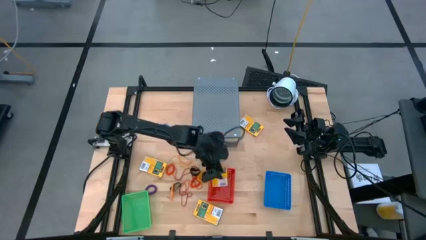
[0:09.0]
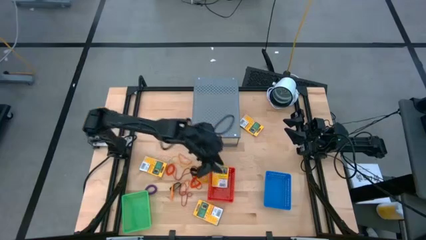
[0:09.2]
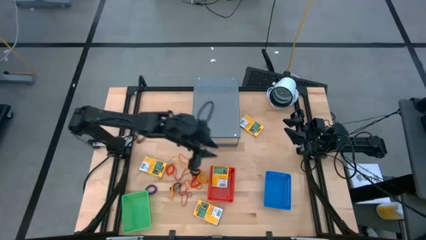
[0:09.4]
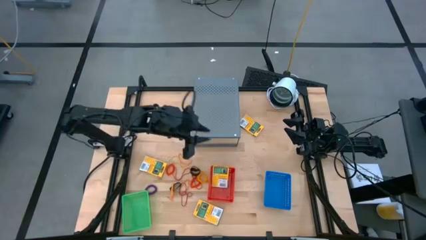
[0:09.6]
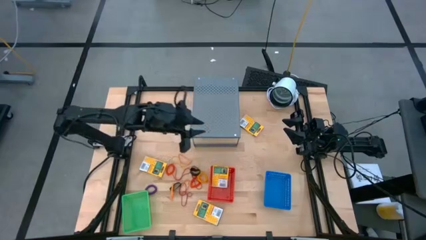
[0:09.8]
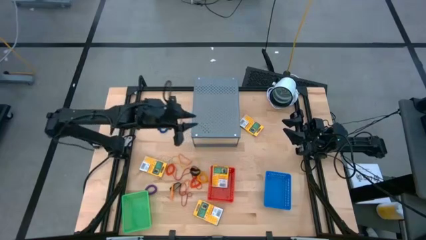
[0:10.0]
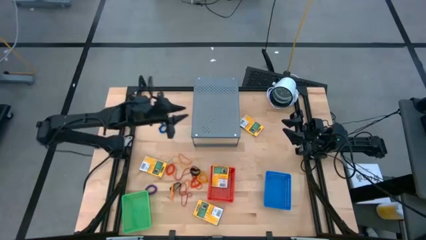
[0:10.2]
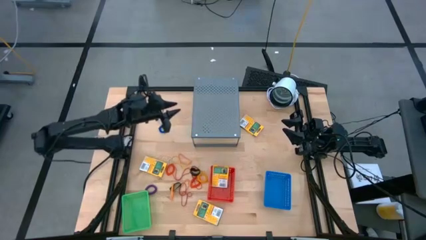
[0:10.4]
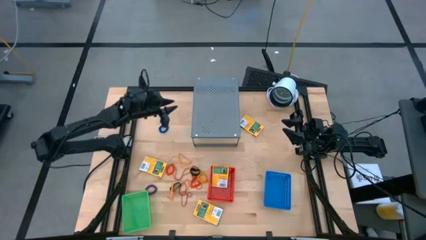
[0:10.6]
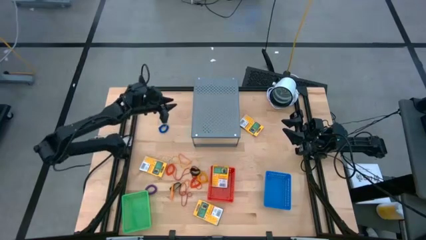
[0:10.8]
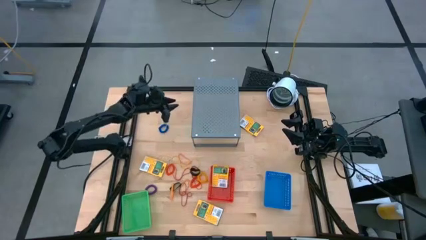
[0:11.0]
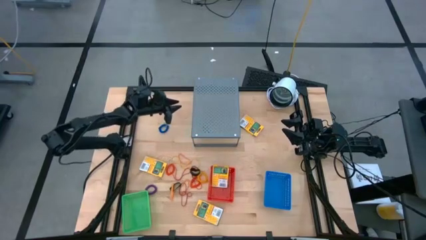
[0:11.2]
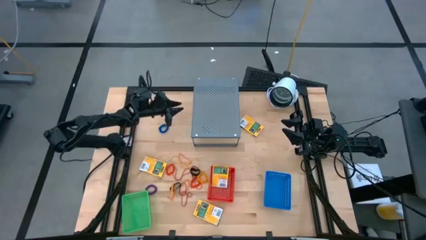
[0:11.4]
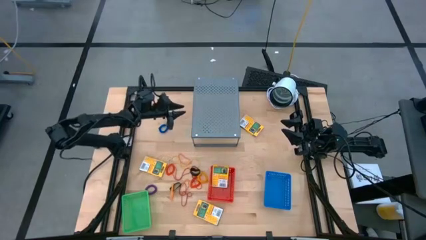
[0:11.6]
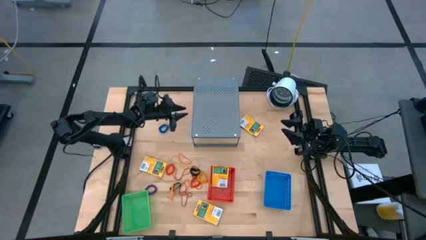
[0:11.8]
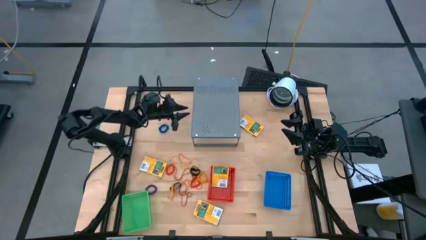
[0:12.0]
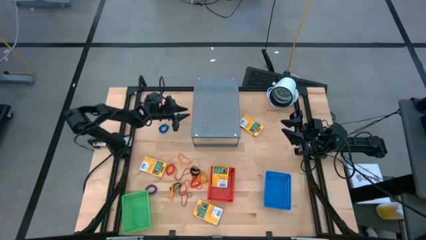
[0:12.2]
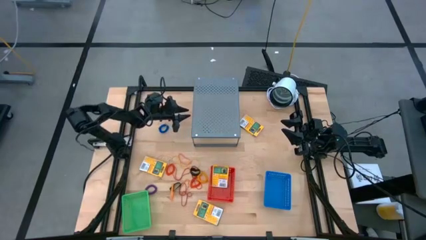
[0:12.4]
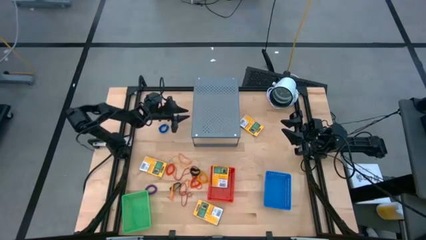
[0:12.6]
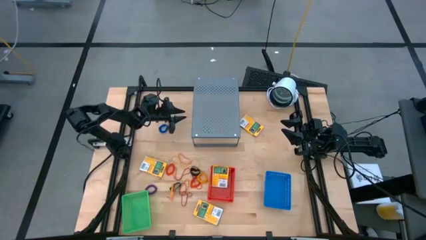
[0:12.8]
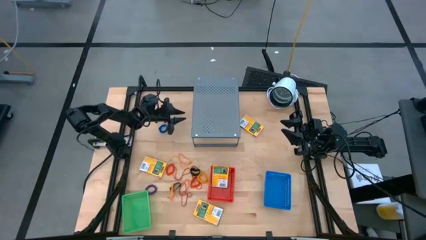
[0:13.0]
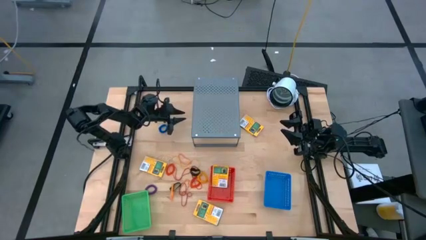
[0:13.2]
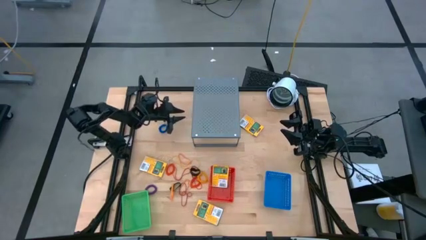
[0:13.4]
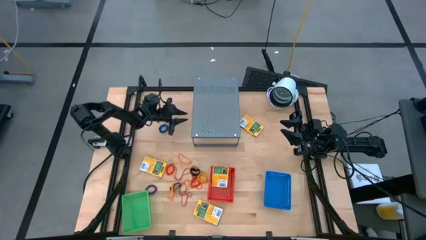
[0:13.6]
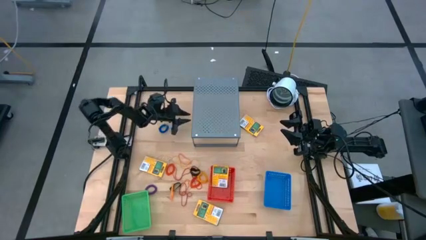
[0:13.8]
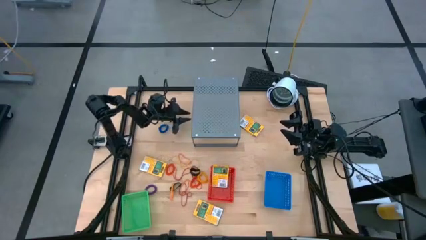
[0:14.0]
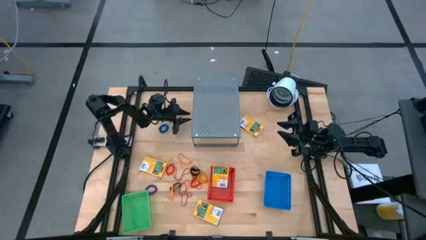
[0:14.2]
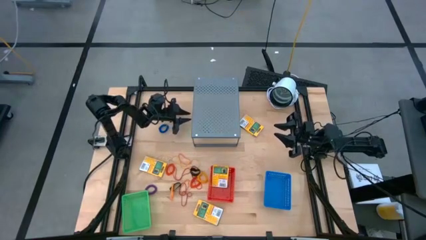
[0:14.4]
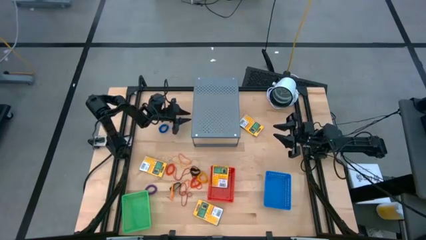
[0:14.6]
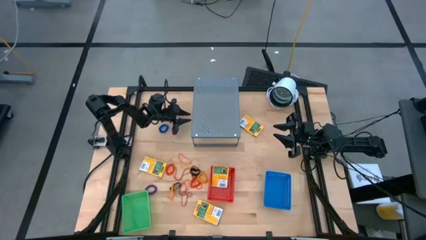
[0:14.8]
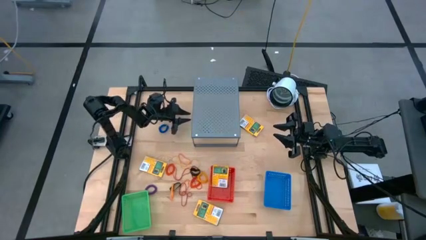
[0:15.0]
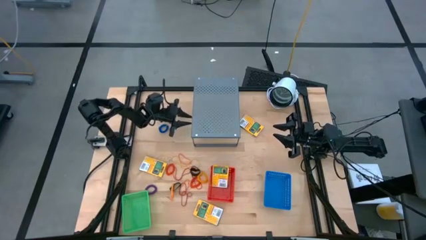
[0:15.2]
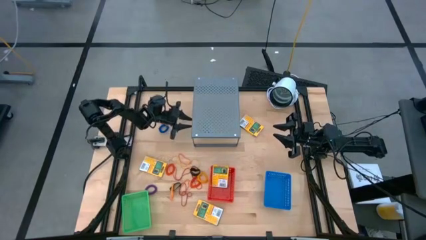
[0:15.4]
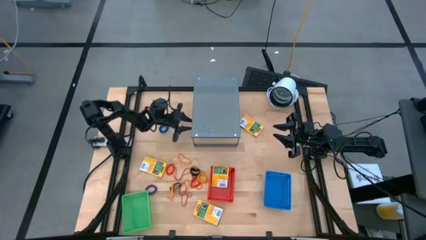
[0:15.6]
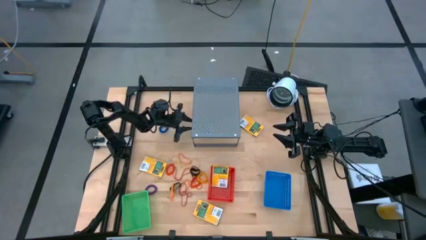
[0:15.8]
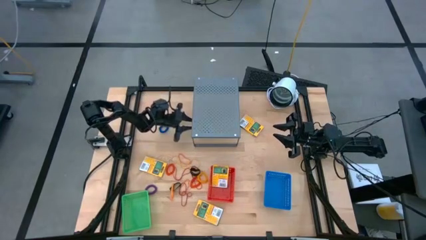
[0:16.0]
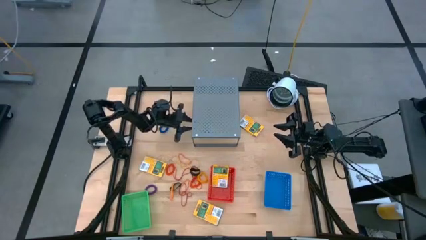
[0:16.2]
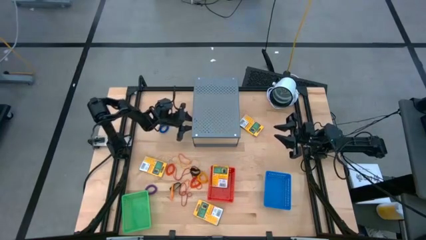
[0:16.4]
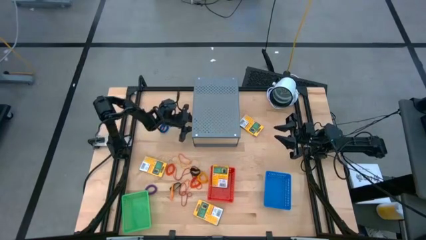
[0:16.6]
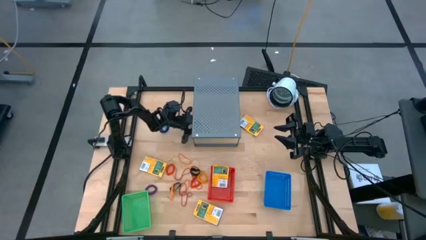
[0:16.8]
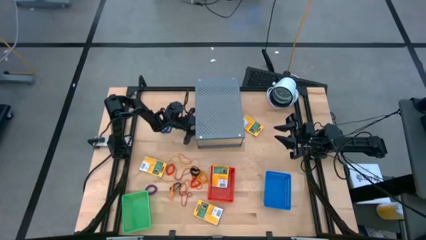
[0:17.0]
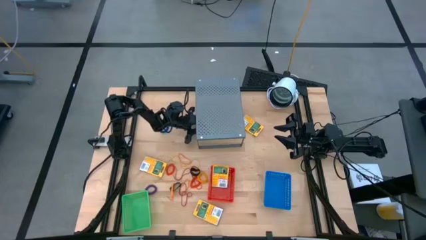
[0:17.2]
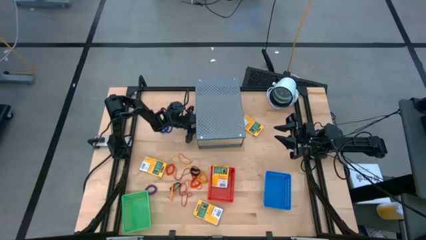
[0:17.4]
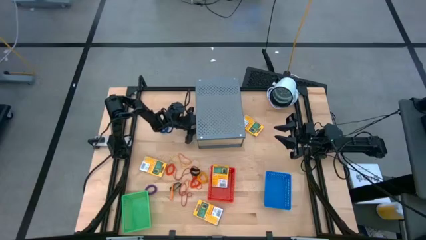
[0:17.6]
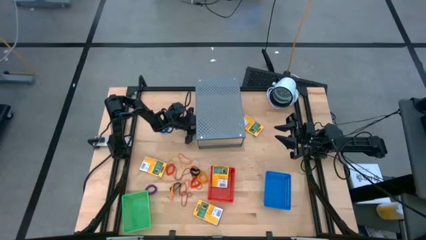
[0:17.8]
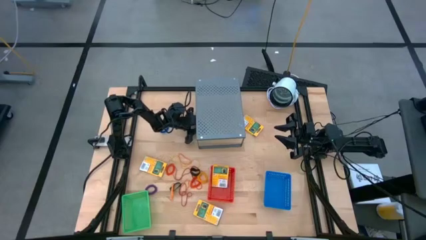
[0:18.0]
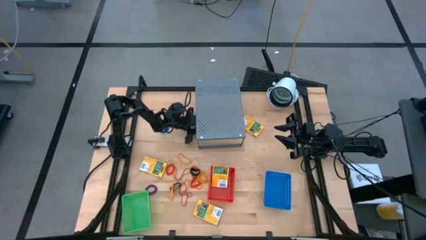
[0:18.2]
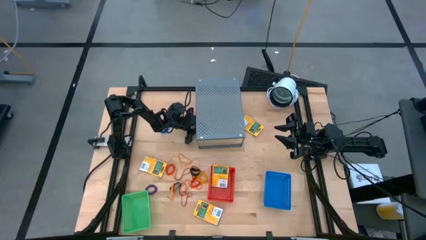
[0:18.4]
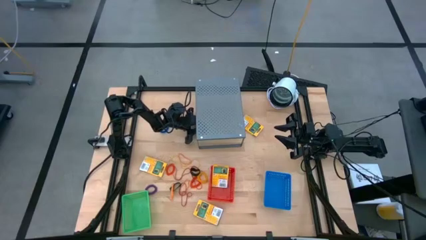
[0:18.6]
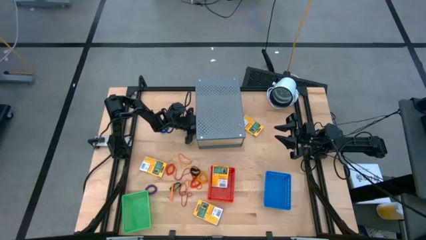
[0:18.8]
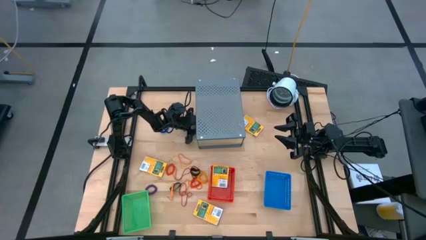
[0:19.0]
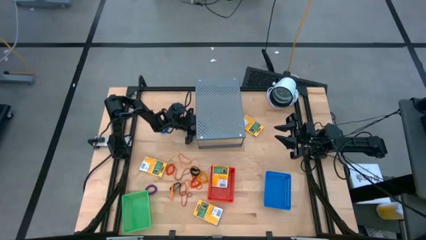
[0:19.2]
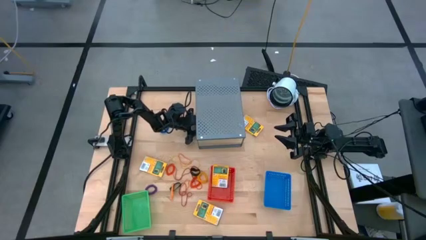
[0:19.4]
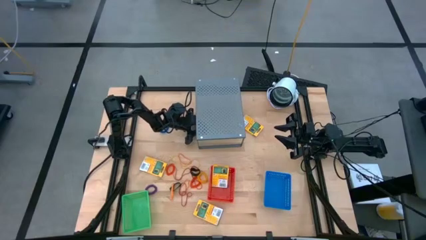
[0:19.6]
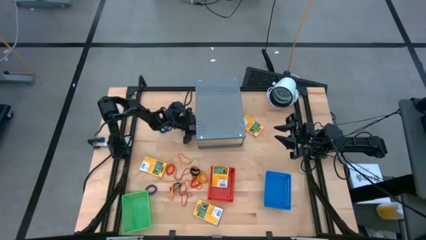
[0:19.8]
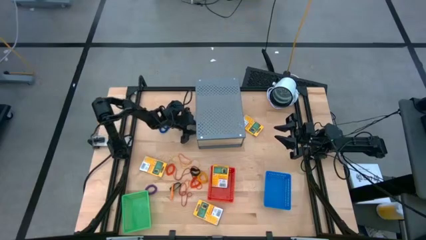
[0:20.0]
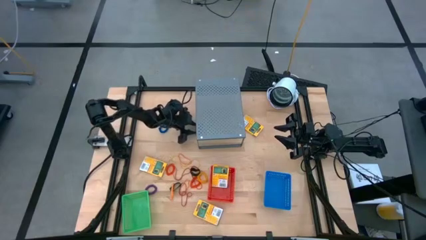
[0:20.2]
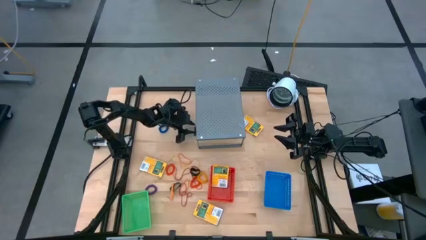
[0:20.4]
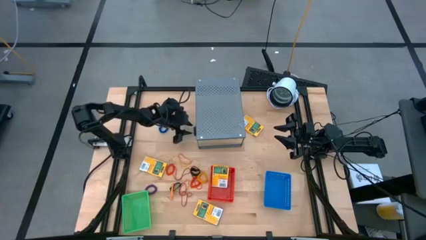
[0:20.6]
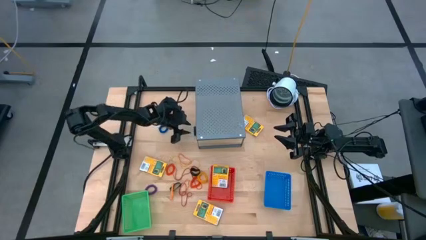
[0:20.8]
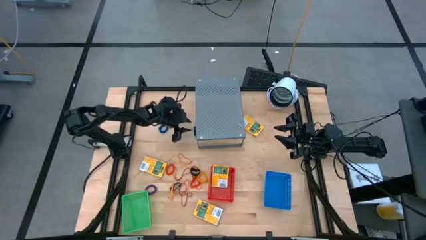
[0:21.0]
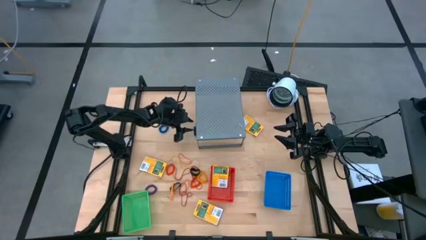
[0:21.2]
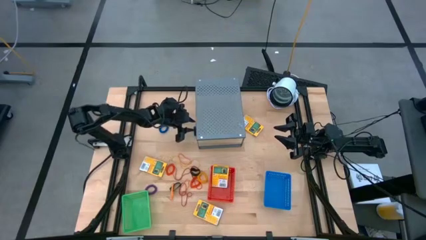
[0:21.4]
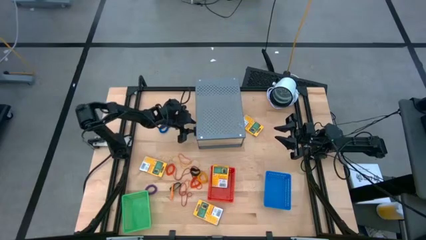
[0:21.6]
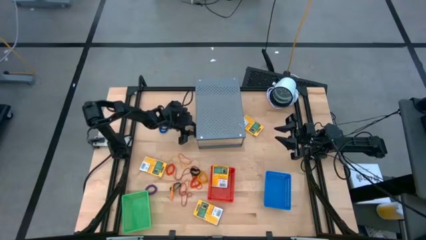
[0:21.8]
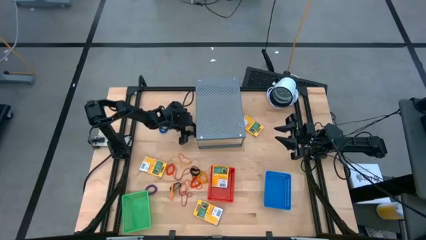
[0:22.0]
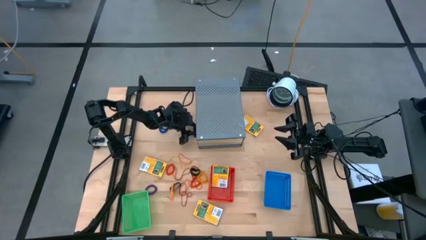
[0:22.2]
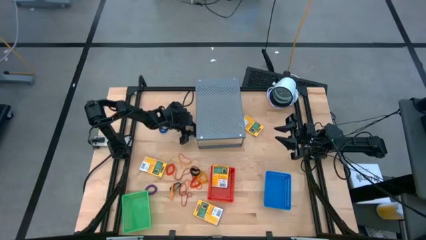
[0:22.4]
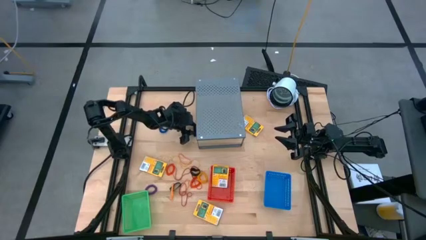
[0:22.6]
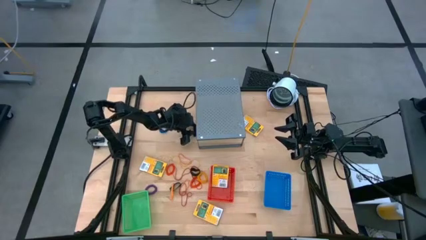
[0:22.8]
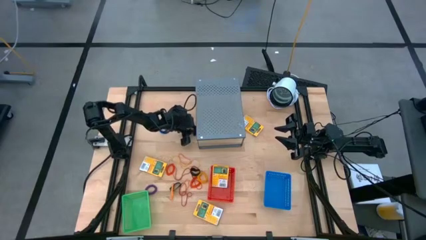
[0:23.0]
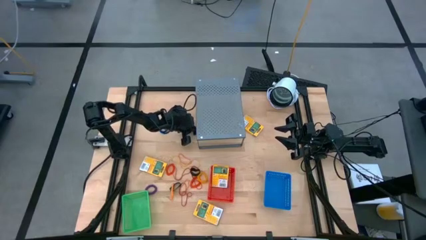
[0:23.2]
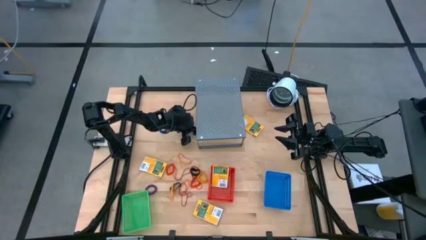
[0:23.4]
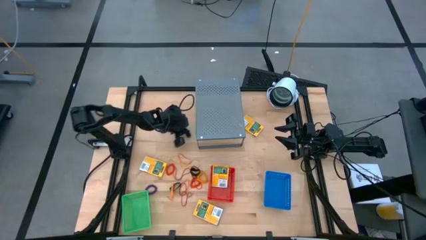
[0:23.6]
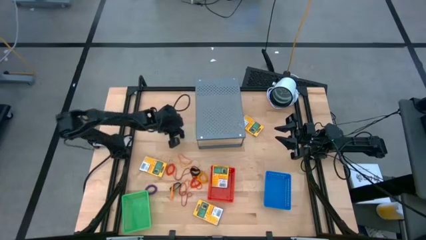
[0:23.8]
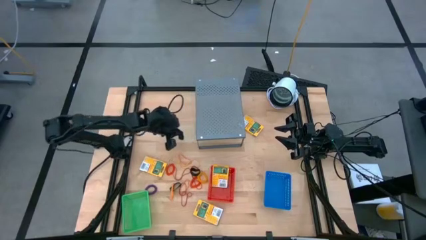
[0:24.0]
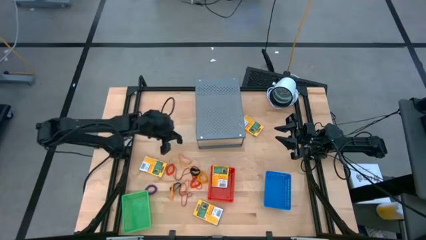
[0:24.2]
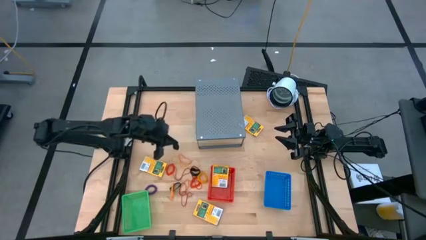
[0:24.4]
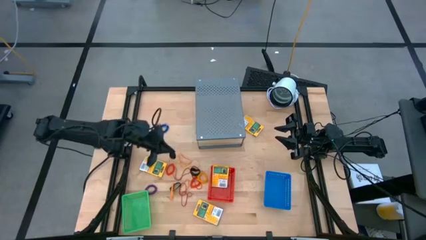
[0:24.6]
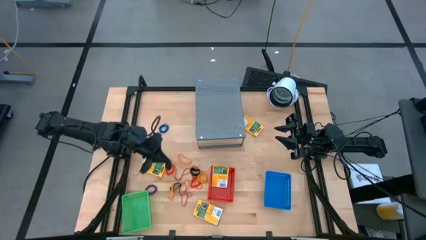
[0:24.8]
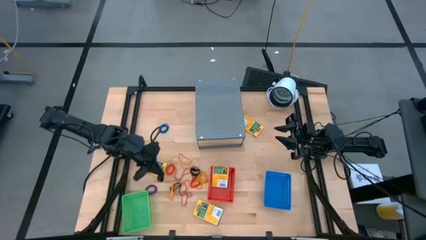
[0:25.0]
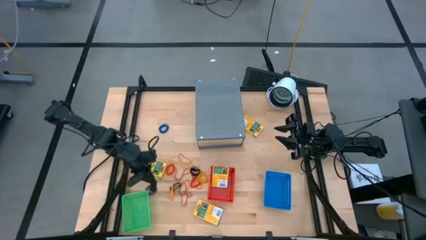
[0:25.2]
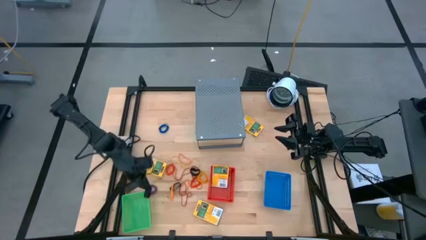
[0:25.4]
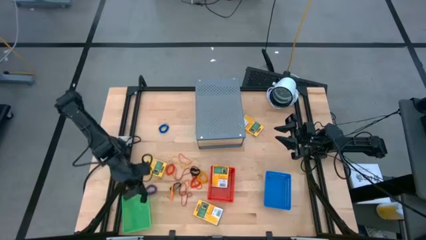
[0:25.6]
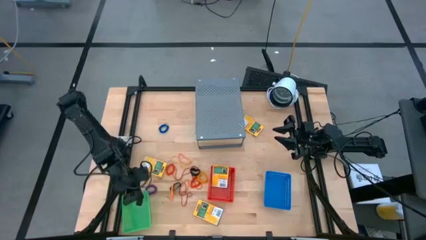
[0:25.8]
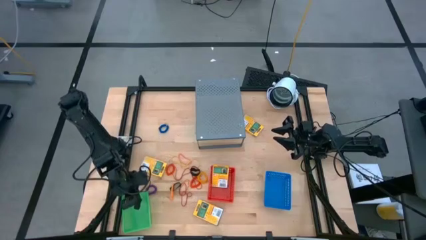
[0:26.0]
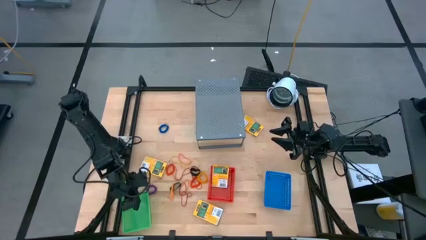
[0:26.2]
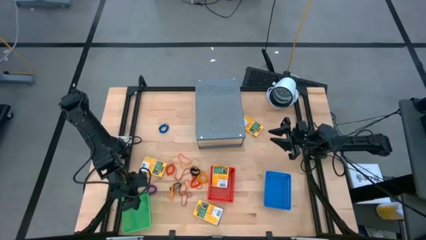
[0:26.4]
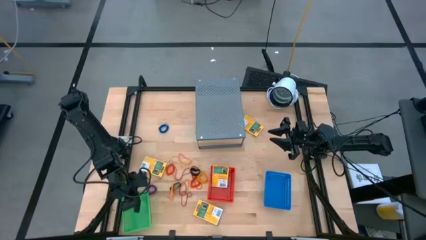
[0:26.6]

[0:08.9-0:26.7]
Task: Pick & Place Office Desk Supplies
Put the black rubber band into the green bin
